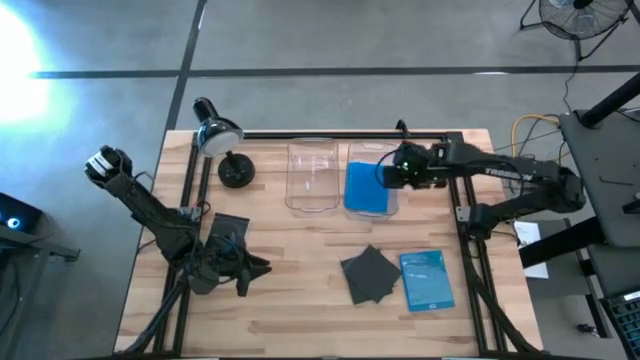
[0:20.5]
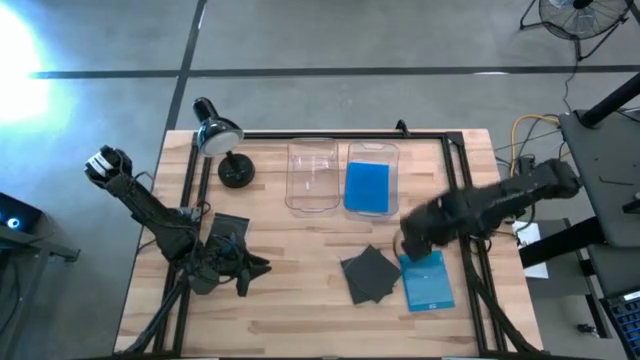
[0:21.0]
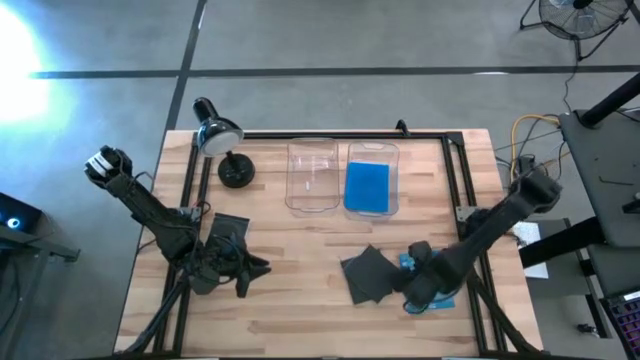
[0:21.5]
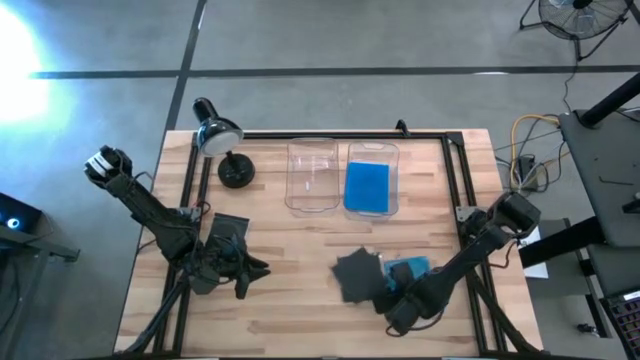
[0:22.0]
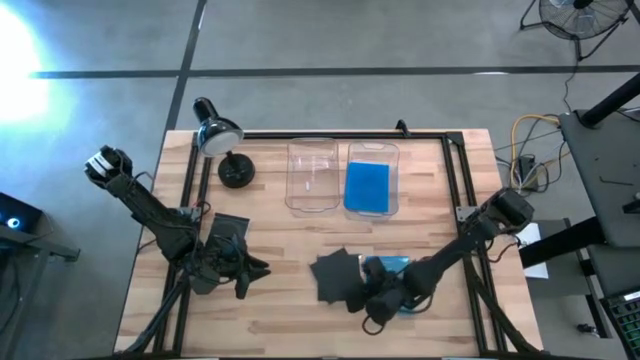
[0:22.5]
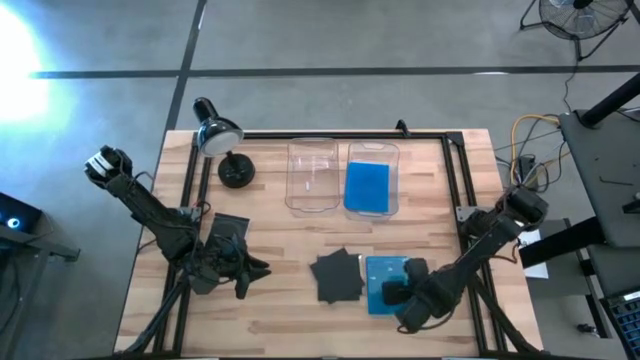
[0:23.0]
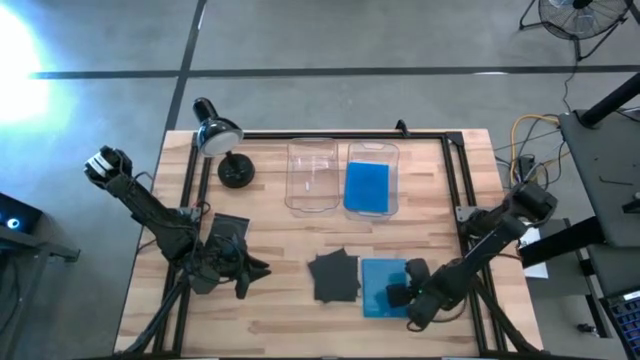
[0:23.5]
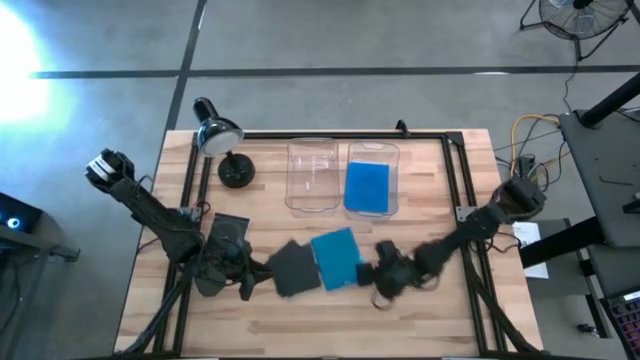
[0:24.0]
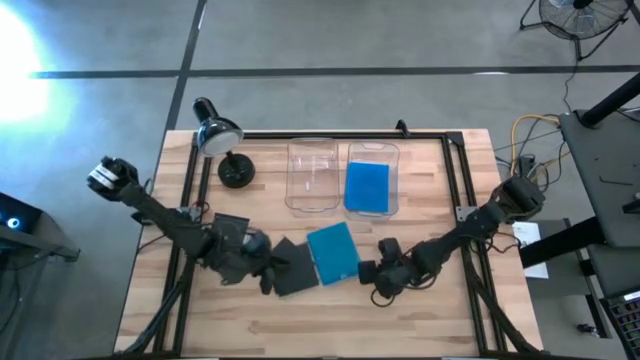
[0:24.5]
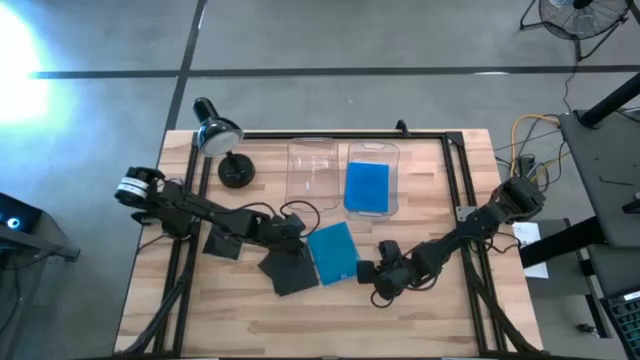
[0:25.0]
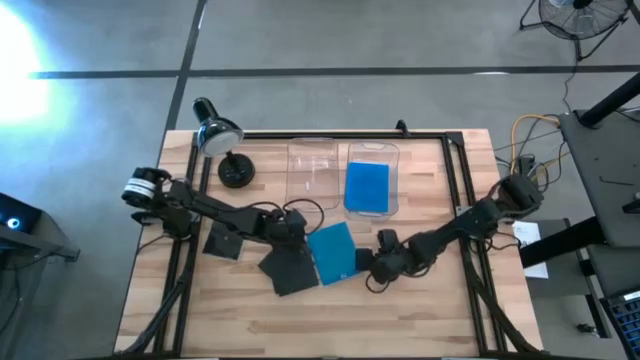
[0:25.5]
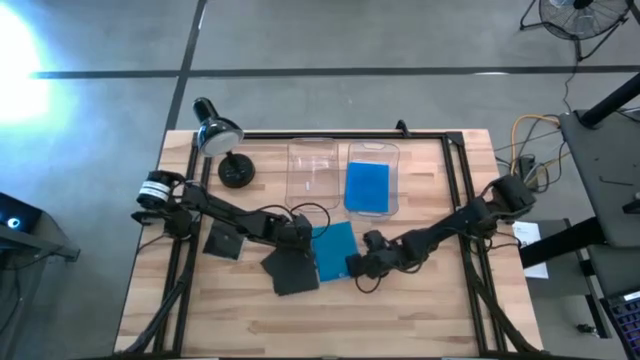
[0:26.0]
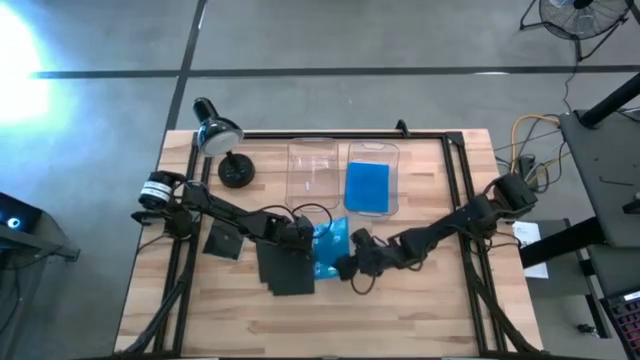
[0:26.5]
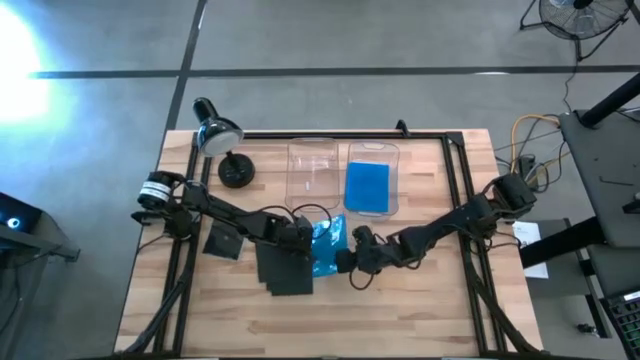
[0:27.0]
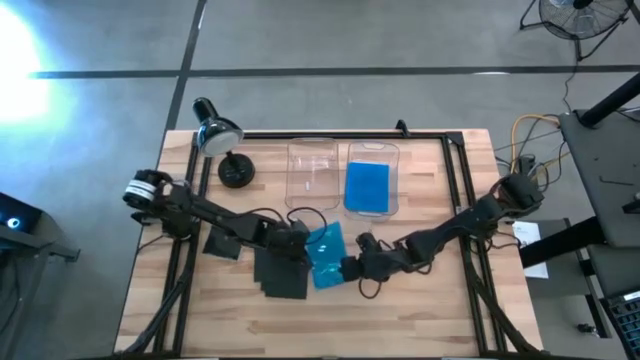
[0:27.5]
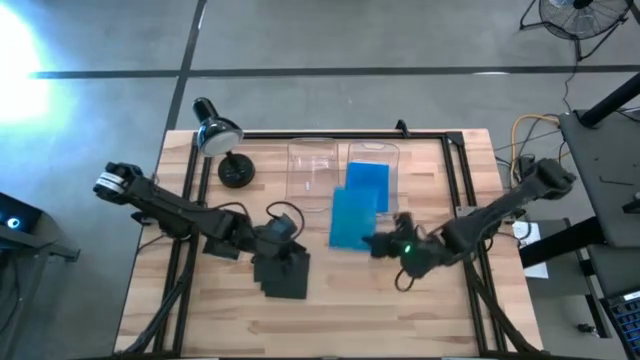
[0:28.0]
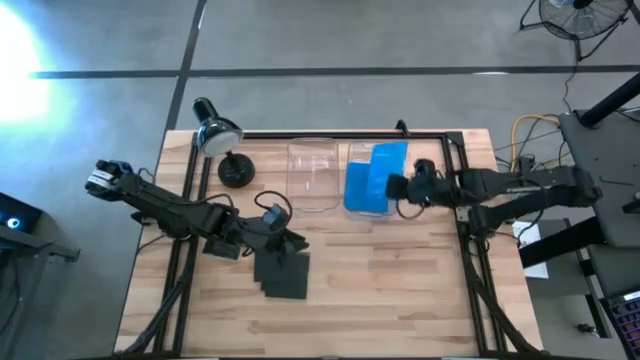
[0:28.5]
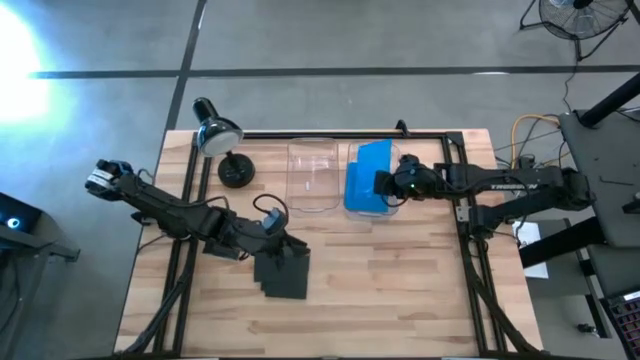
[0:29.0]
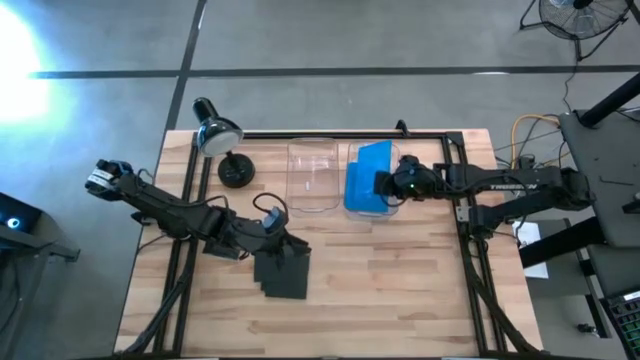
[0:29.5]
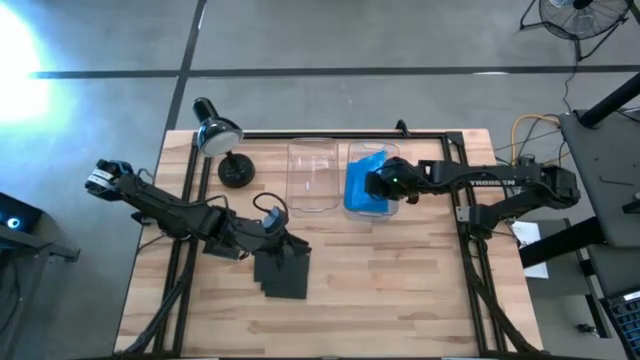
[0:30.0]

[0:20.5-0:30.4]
Task: Pick & place jewel cases by type
Put the blue CD case into the right transparent bin

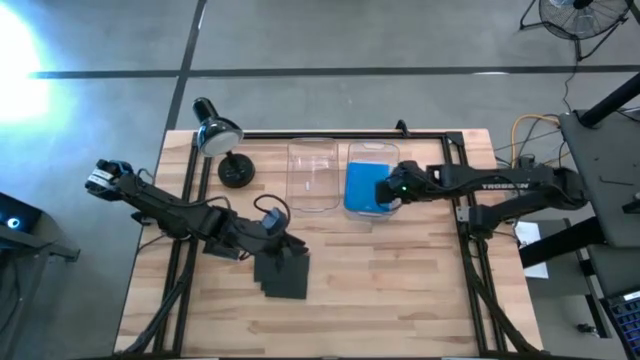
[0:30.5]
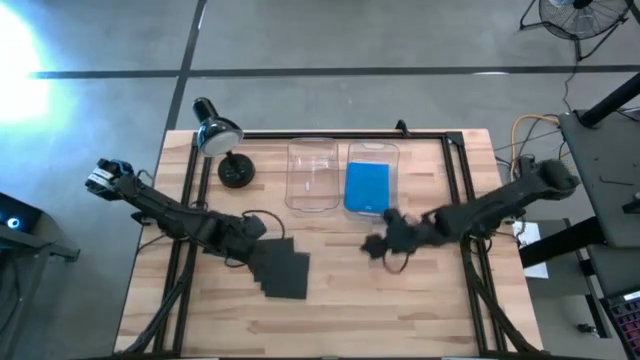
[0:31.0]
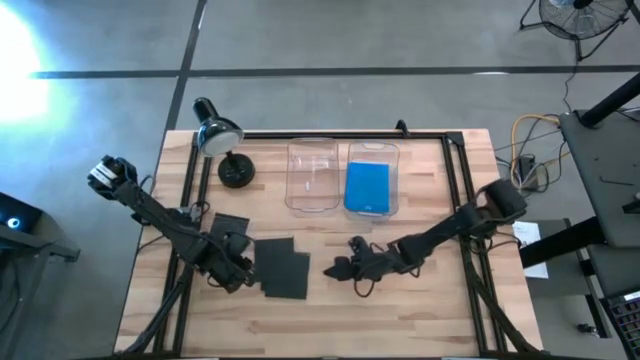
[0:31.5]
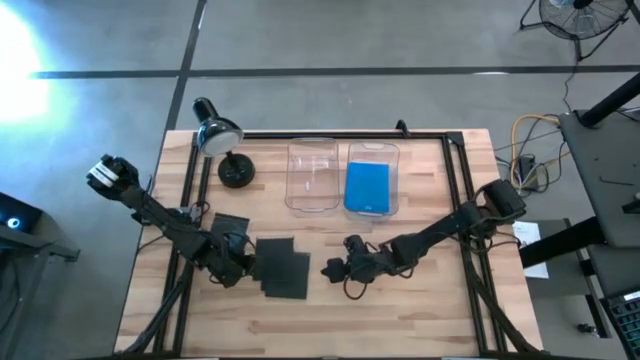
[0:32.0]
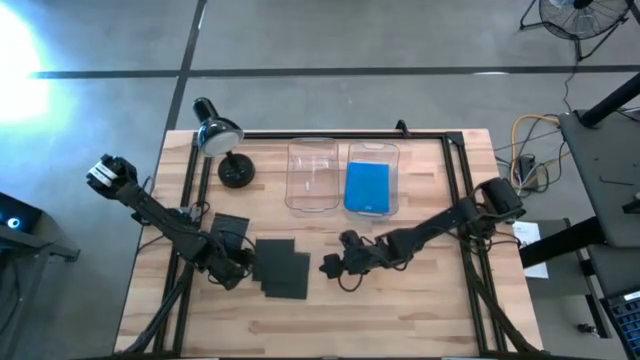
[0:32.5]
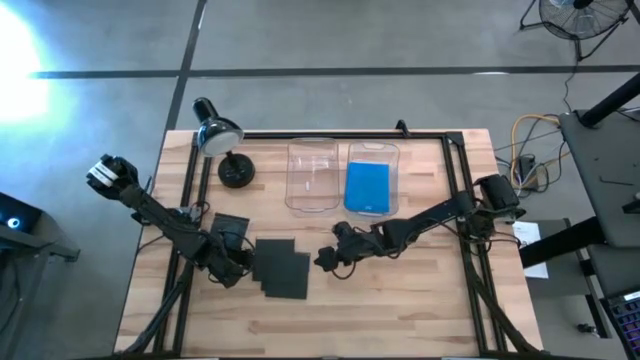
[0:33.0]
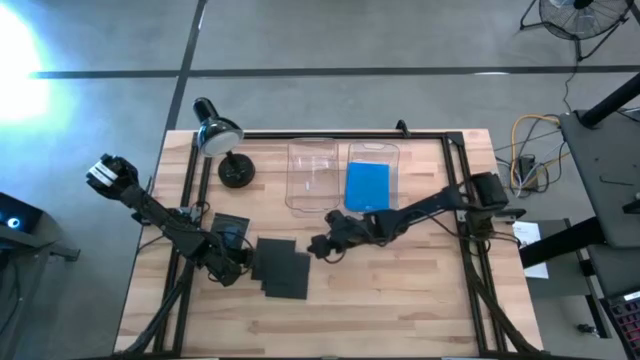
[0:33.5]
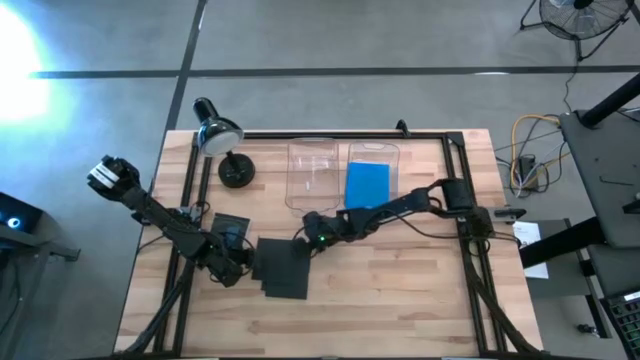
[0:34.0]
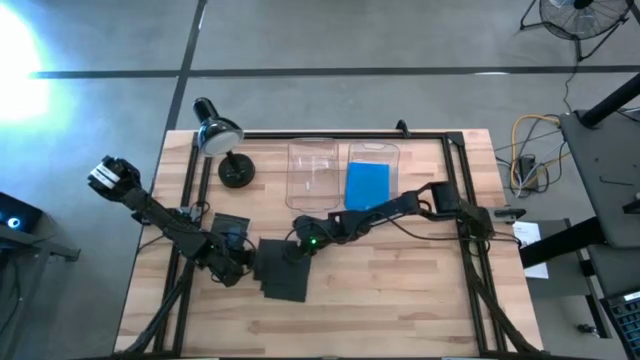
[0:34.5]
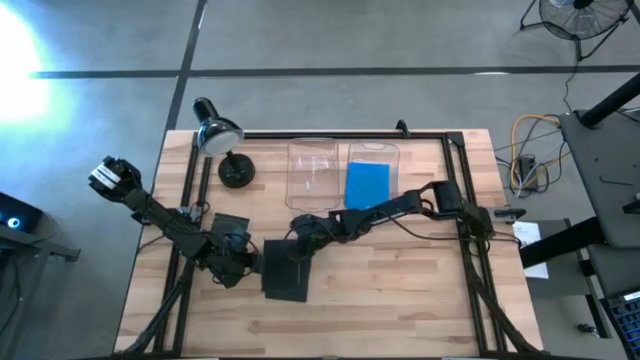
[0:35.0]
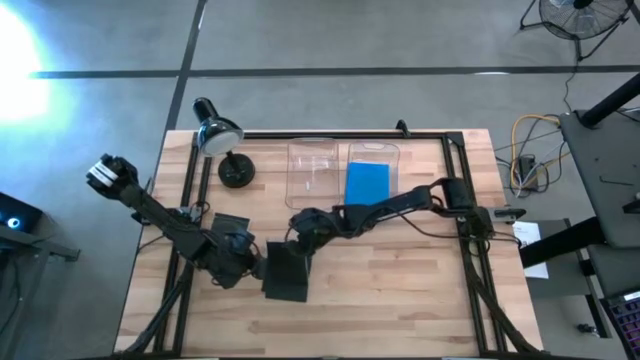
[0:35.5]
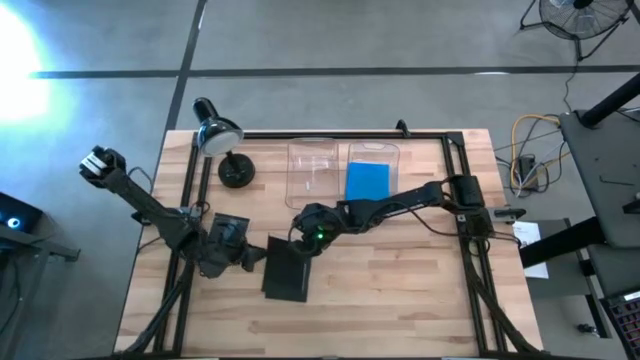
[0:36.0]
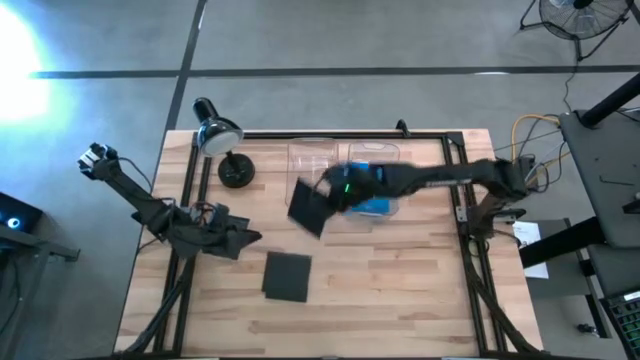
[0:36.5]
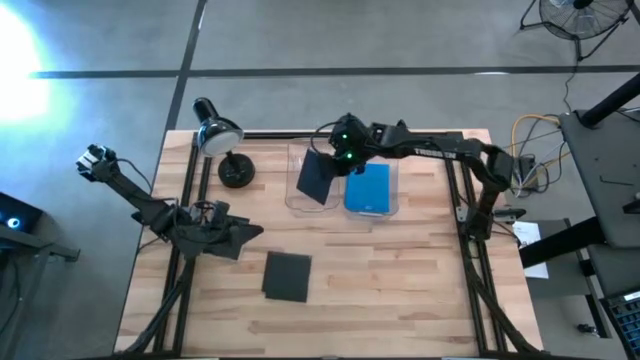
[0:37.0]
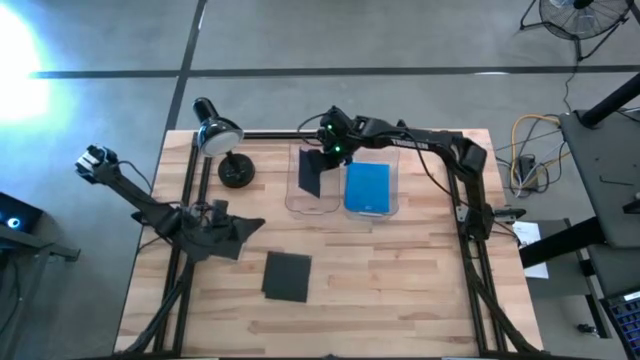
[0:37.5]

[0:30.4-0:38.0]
Put the black CD case into the left transparent bin

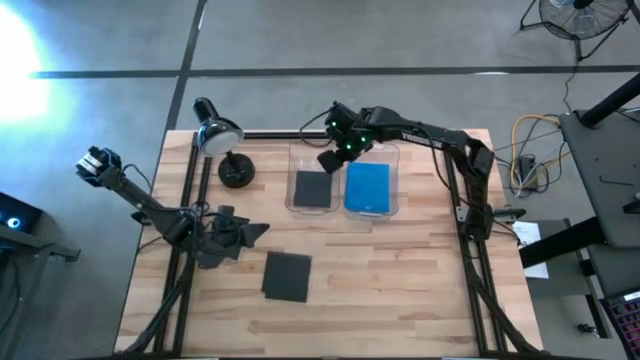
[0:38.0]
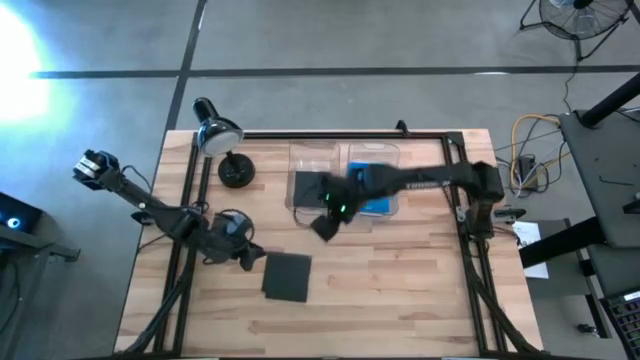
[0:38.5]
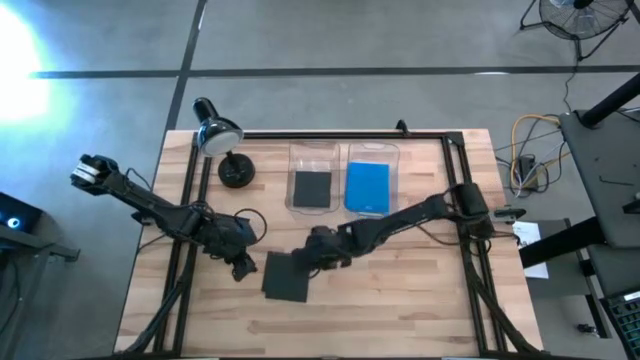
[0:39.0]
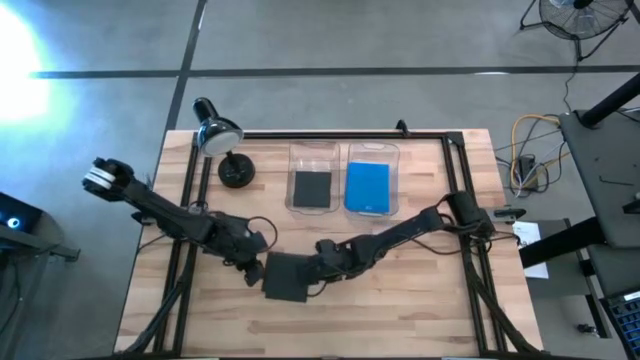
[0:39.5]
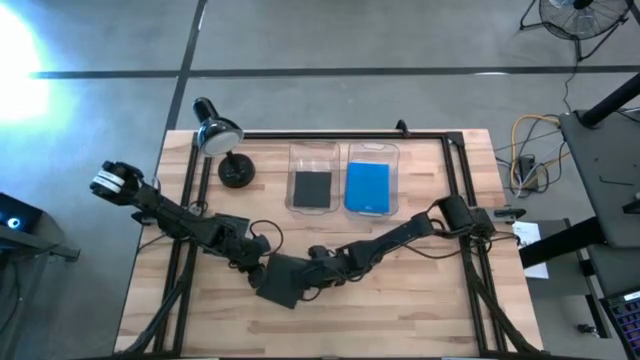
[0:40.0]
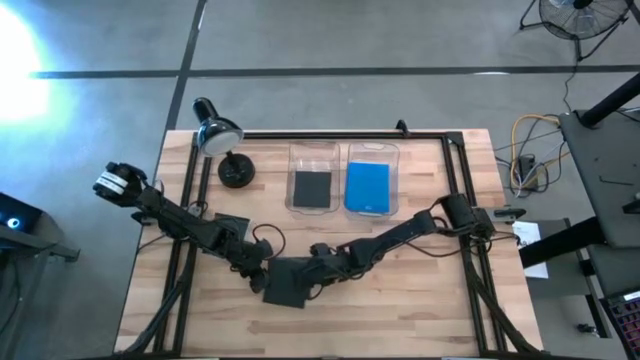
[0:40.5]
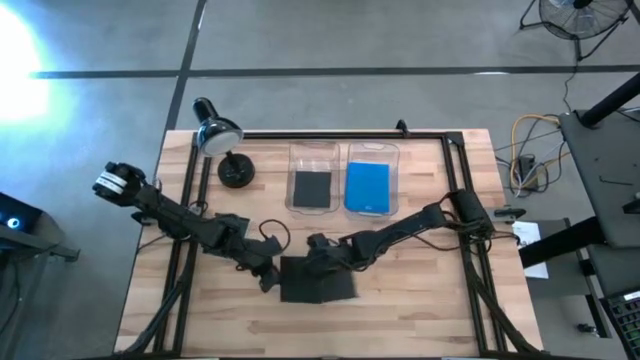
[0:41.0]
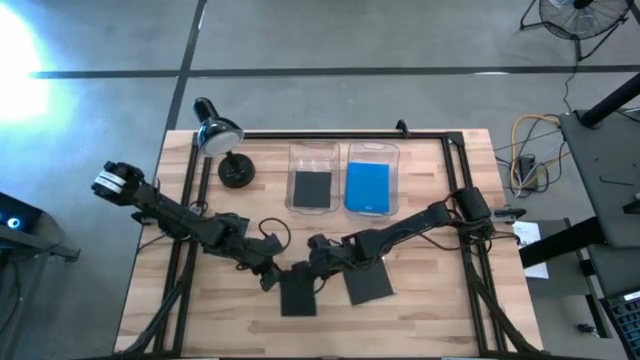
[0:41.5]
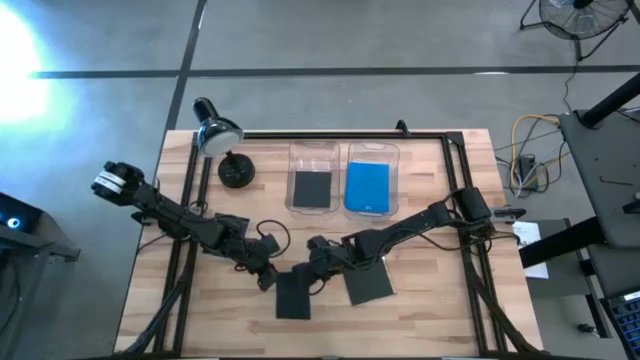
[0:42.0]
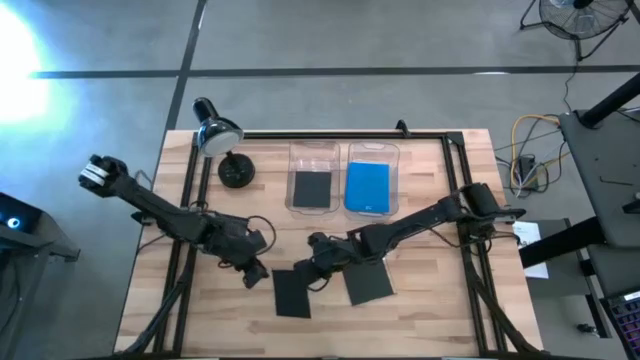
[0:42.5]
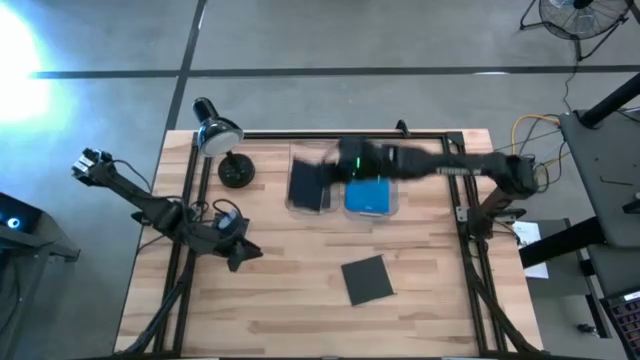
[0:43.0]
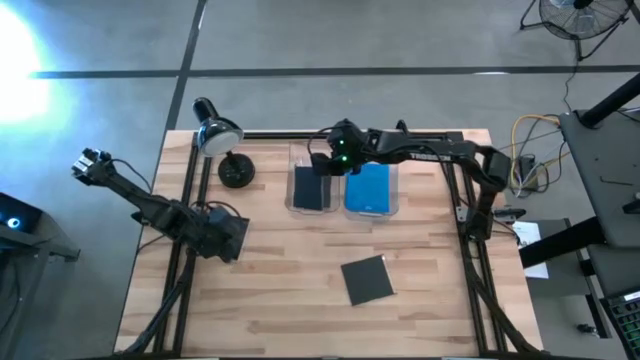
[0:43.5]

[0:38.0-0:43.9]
Put the black CD case into the left transparent bin
